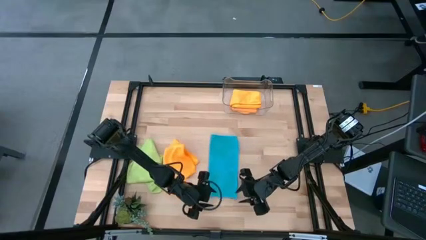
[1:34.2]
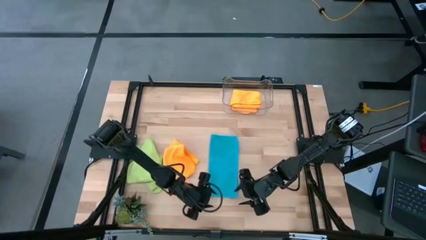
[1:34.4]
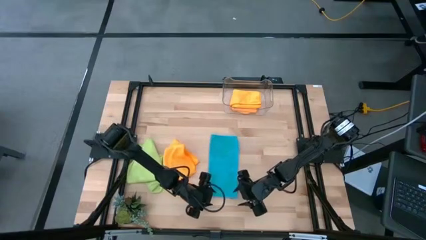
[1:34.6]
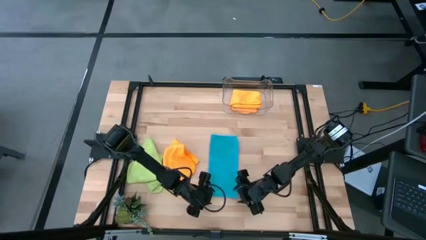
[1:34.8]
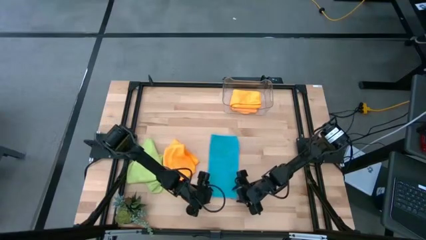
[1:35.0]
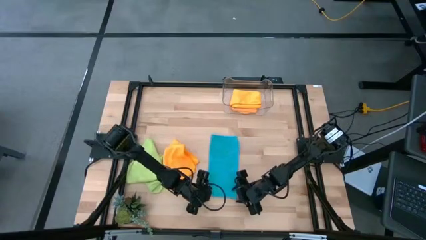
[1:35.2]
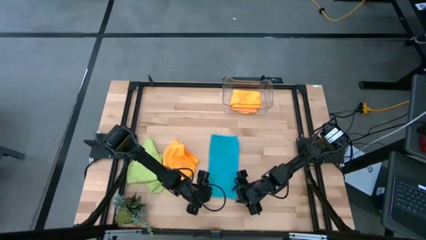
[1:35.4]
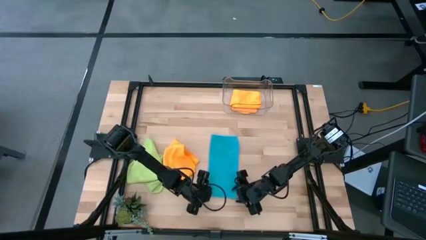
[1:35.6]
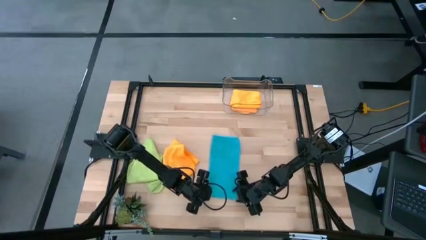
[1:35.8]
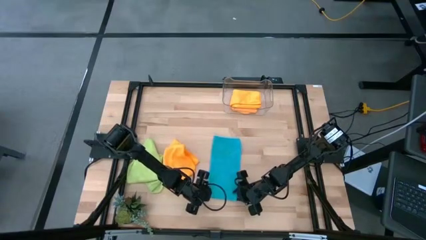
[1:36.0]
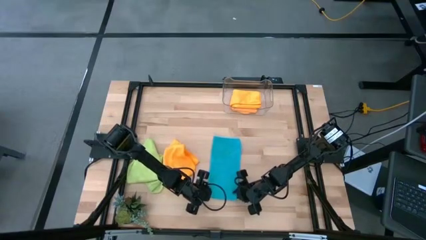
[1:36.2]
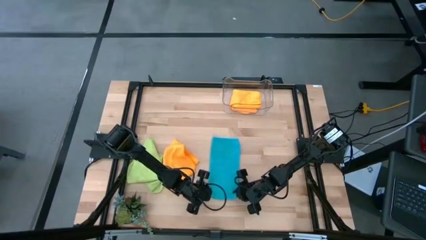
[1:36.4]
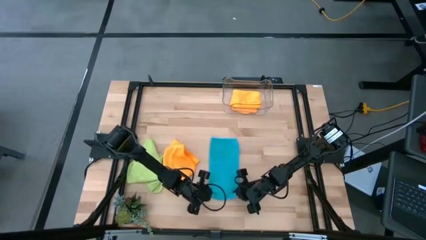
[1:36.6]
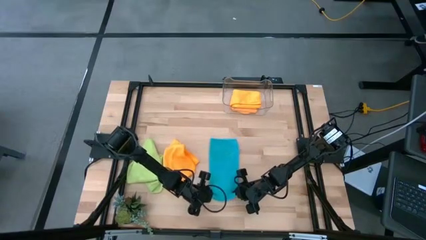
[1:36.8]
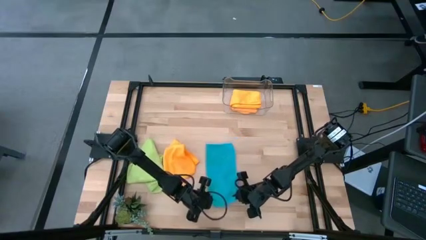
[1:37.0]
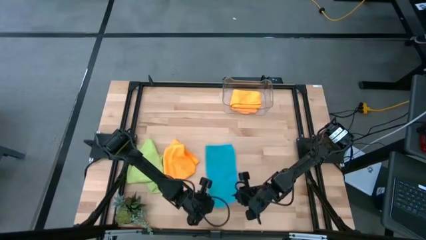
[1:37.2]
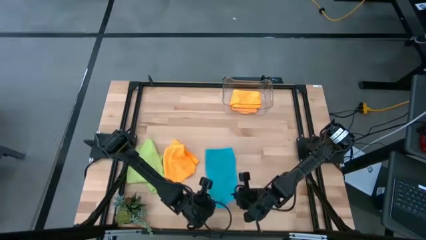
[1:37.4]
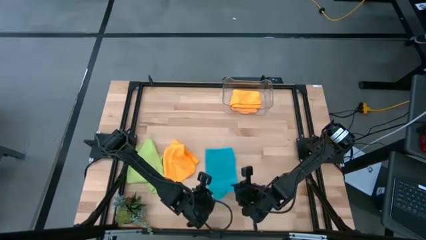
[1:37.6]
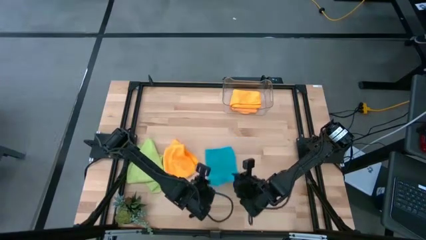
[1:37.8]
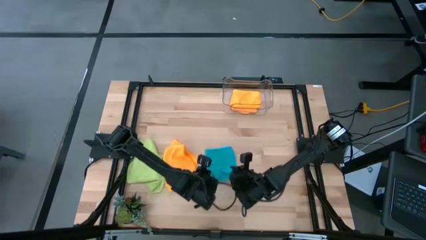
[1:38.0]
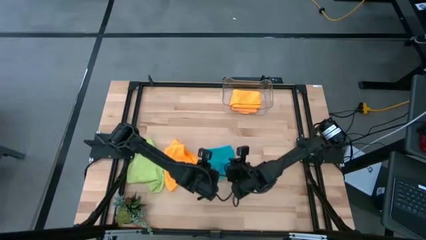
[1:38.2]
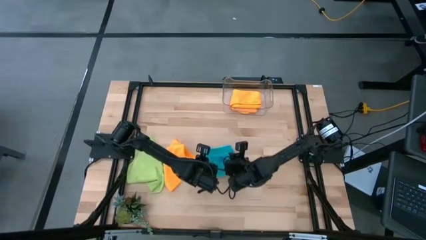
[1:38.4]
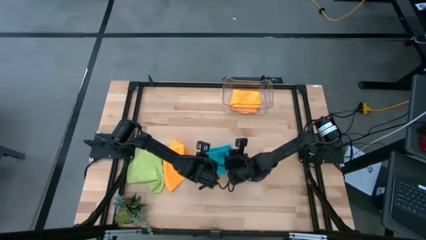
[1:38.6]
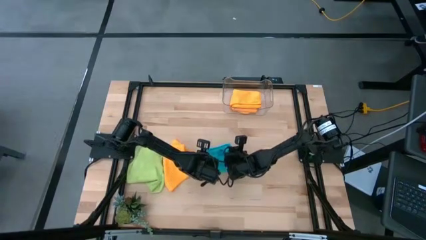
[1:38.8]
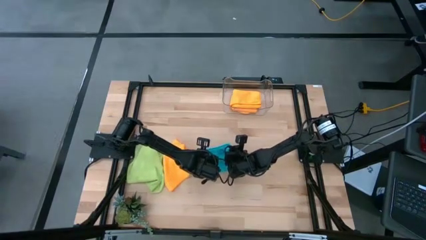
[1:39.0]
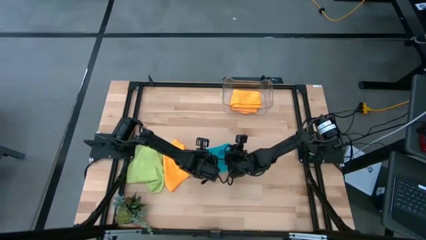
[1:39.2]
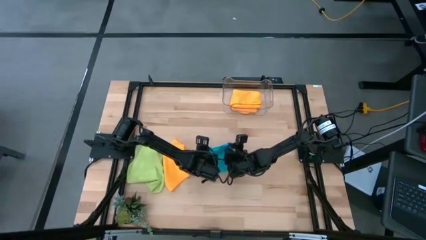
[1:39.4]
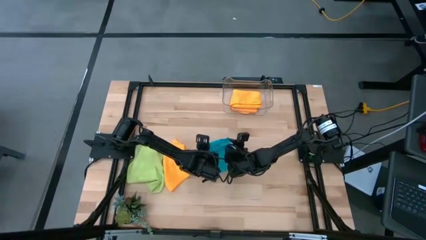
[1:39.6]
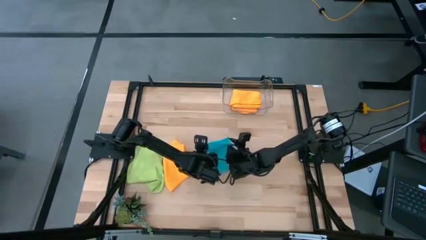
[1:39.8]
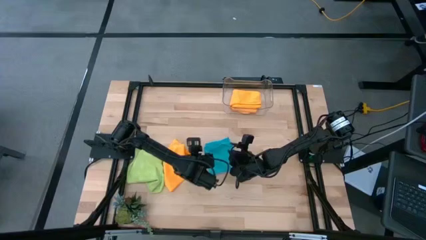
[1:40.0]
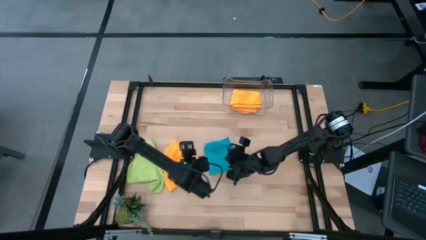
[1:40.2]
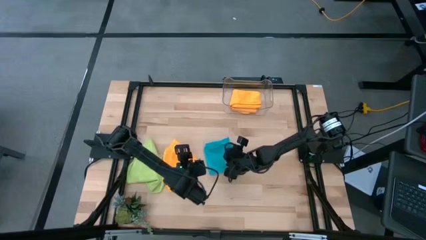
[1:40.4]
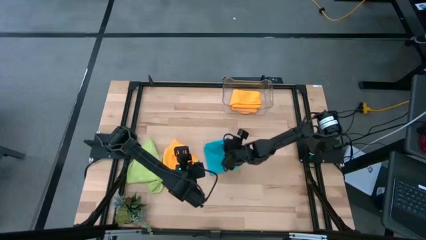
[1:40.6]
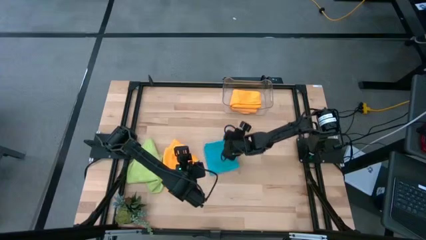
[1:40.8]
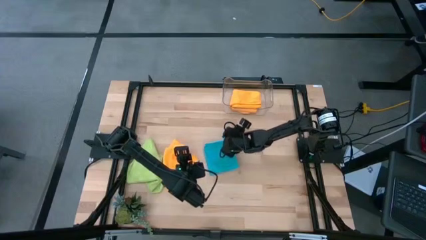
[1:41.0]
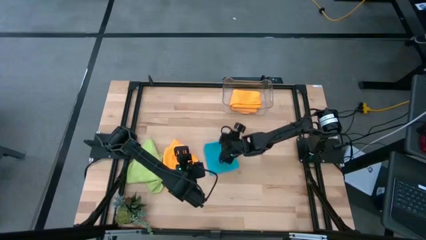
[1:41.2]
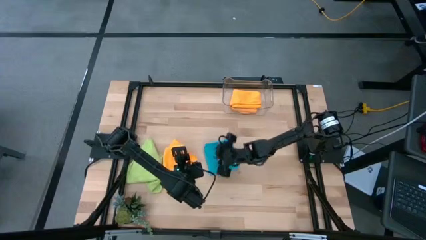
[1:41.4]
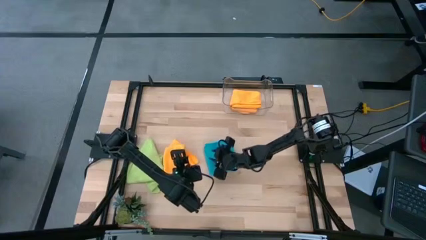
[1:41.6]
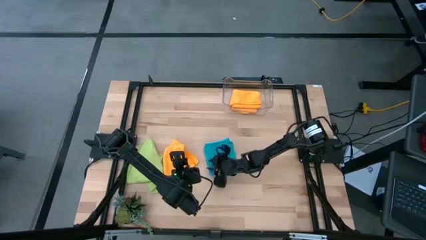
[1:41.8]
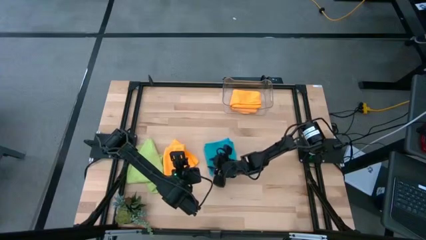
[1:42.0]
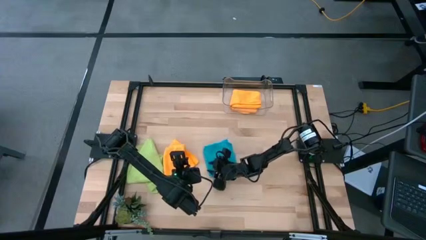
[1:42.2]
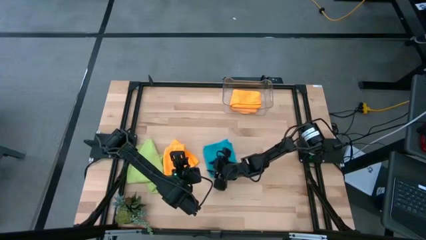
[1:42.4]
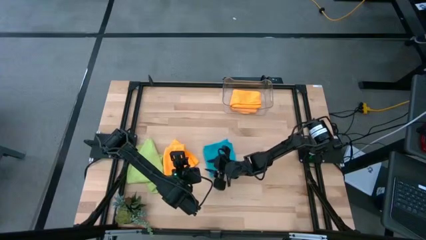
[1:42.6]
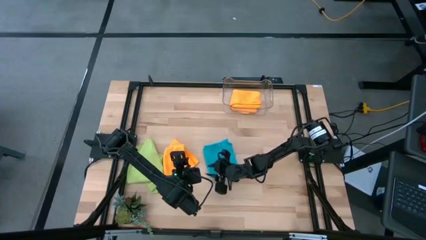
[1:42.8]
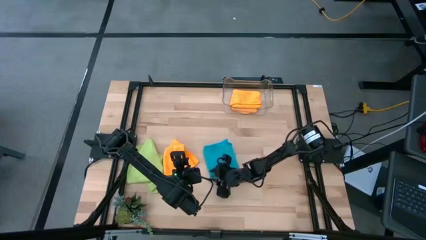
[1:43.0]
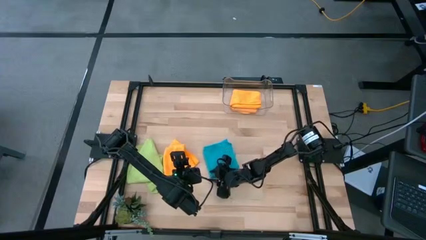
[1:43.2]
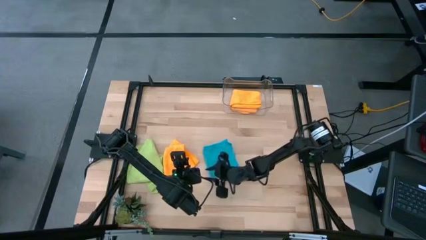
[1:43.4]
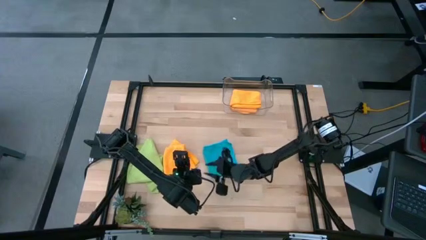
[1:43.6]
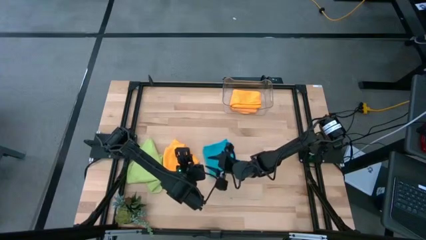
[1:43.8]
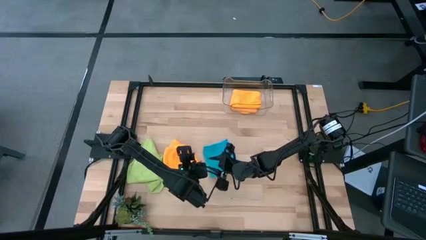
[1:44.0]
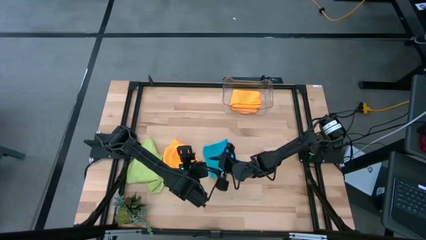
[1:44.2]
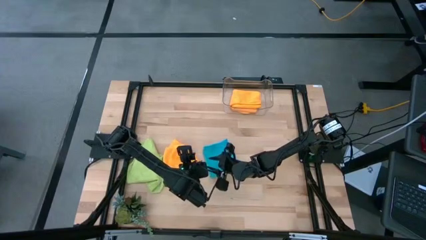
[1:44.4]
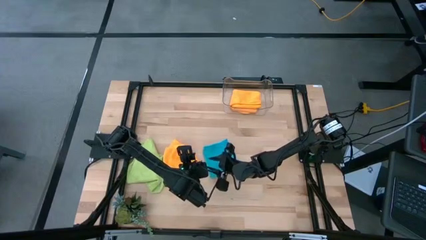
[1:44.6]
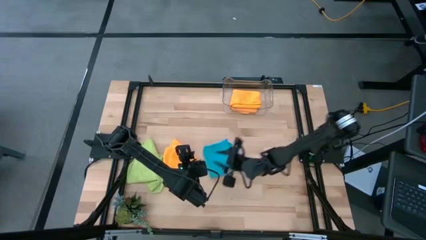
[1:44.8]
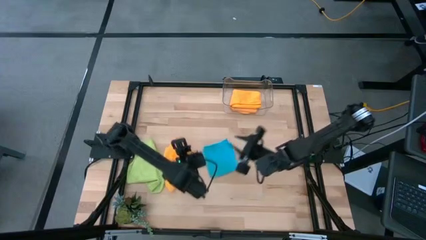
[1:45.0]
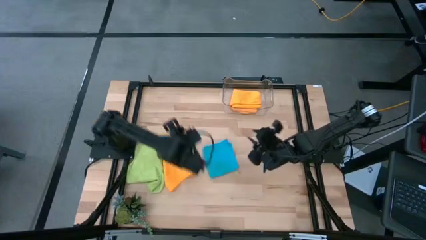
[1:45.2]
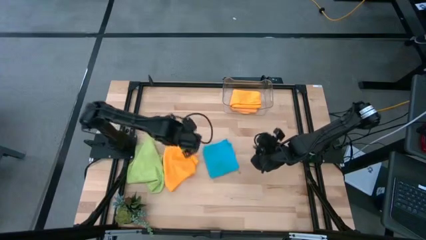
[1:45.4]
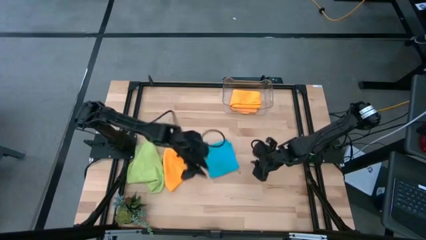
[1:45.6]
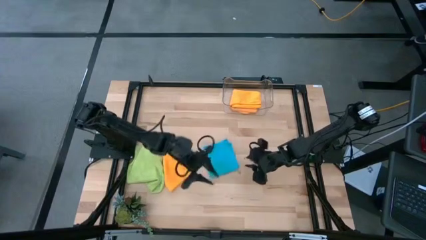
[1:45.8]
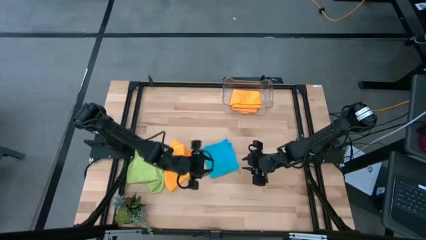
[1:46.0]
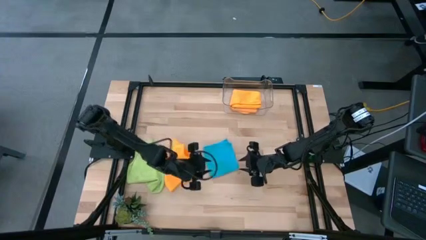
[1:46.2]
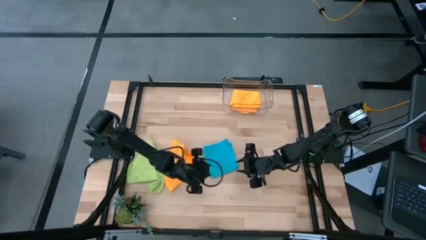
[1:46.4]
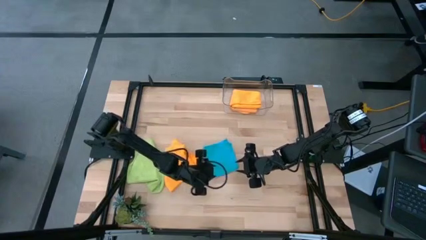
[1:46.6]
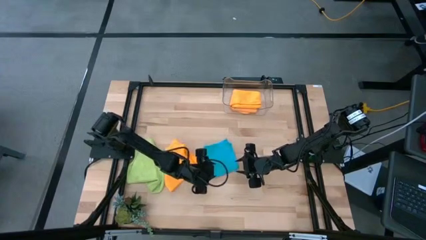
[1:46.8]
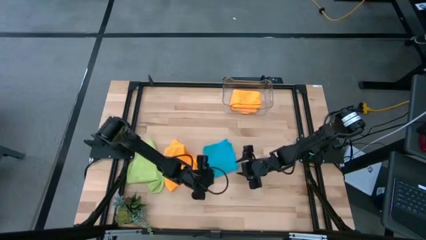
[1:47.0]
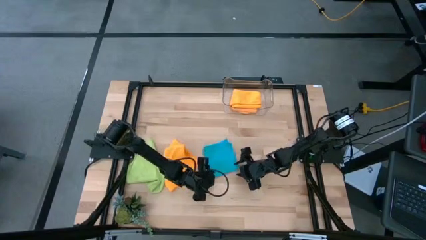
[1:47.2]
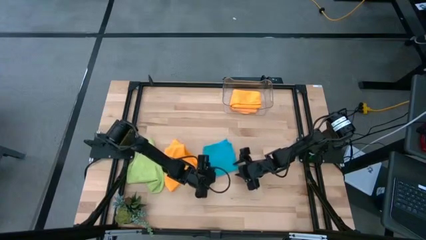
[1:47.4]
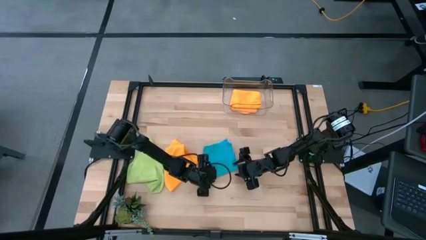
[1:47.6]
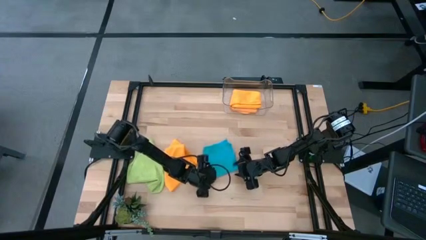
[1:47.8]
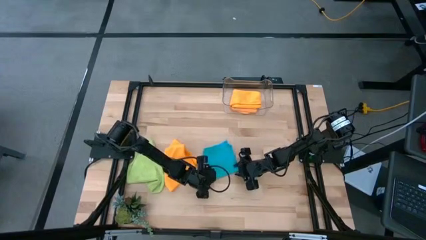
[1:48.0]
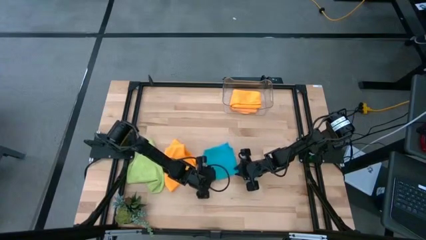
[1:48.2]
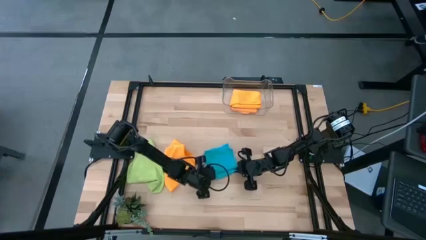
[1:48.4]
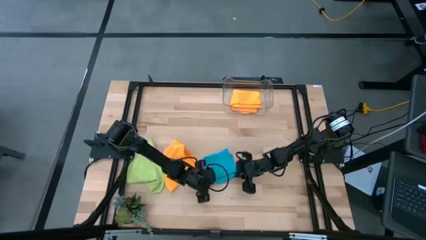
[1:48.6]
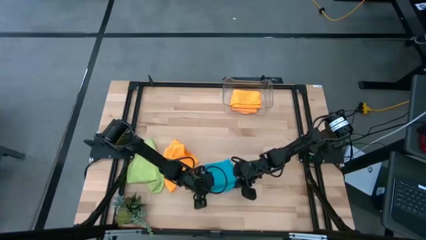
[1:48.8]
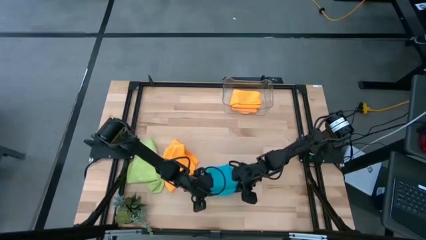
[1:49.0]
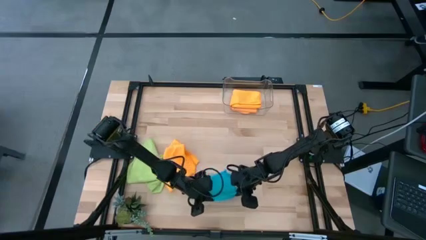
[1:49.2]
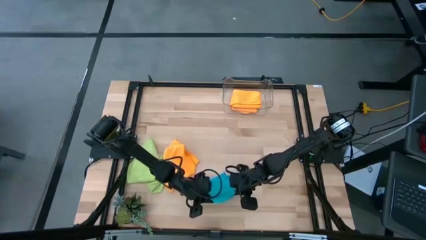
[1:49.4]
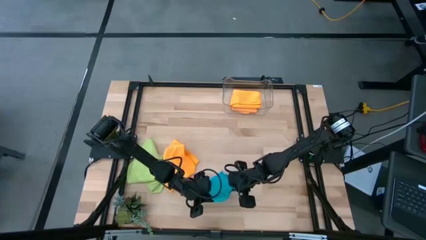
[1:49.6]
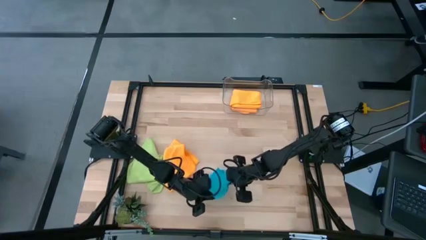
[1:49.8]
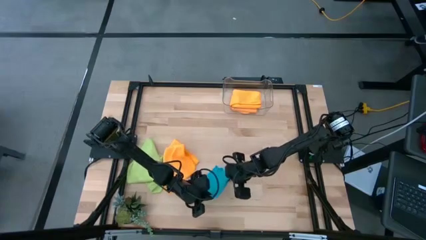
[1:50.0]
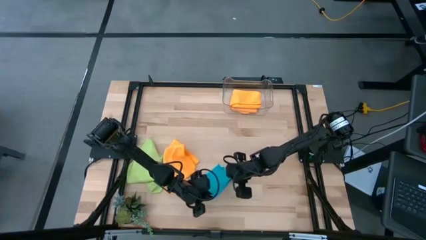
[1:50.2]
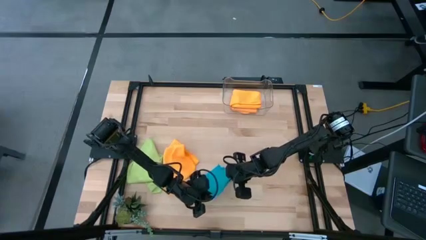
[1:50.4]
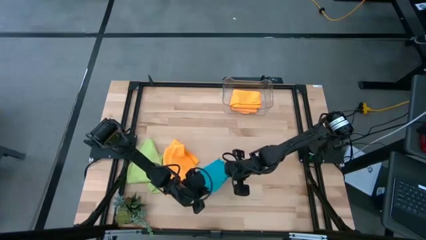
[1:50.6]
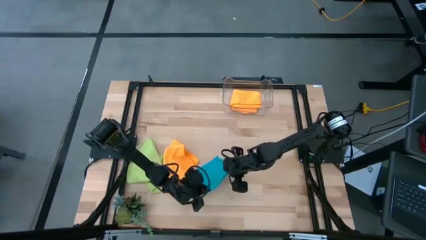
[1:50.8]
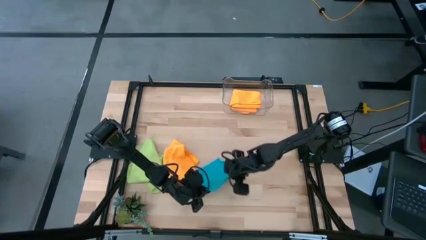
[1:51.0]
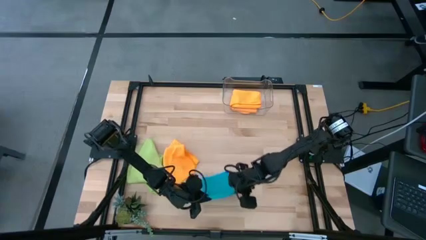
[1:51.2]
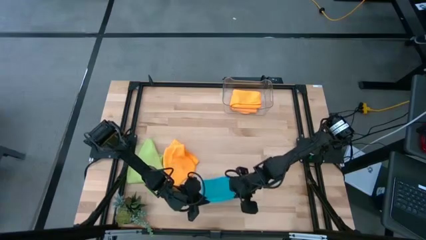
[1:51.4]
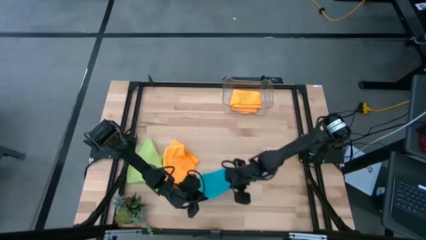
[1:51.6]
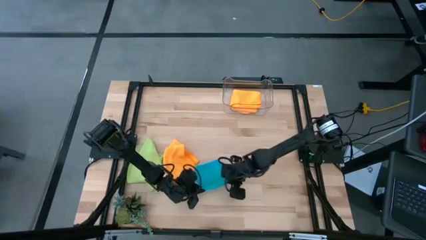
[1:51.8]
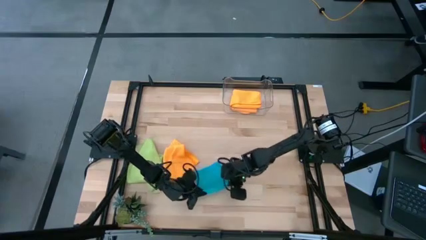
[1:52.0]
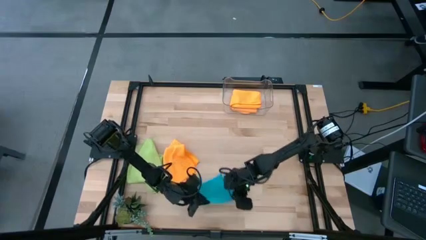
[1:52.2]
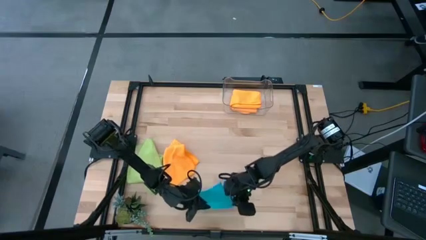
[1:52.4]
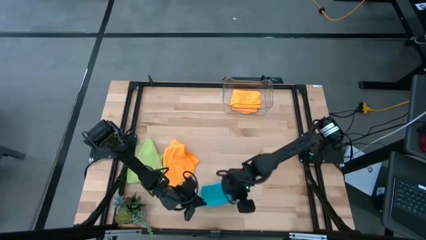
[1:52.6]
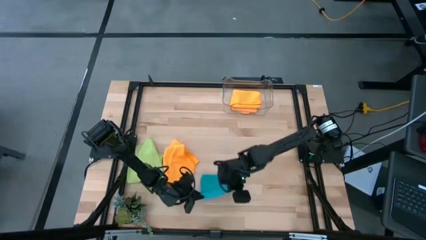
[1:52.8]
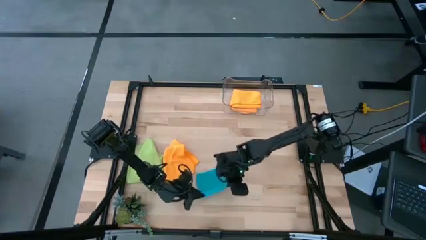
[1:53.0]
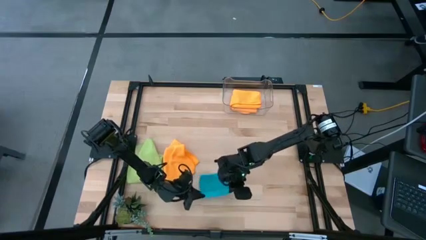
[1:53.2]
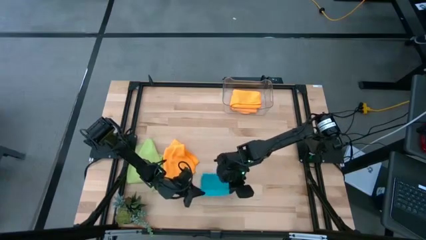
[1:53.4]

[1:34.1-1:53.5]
Task: Fold microfiber towels
Fold the blue microfiber towel
